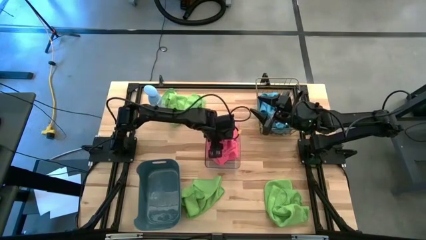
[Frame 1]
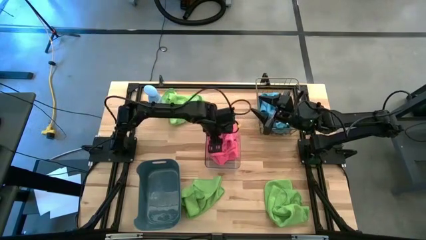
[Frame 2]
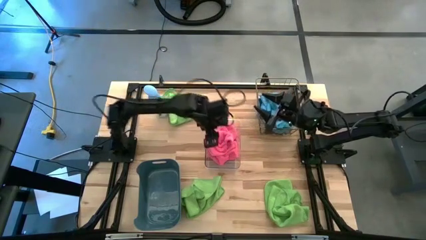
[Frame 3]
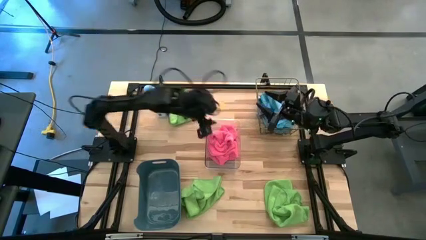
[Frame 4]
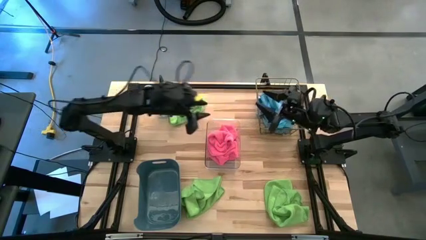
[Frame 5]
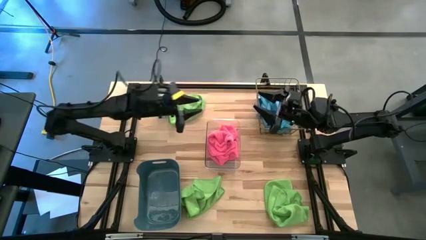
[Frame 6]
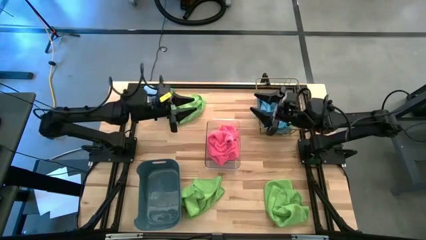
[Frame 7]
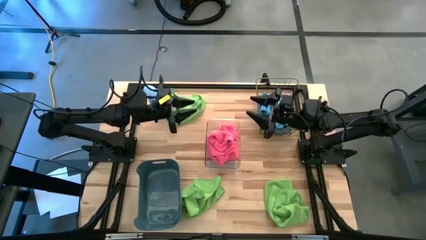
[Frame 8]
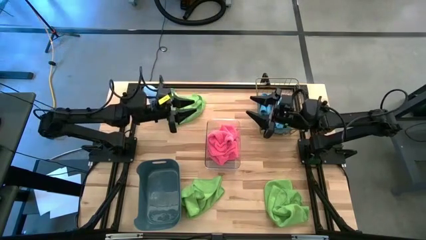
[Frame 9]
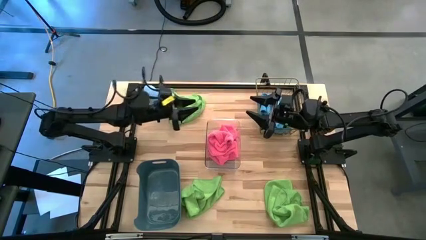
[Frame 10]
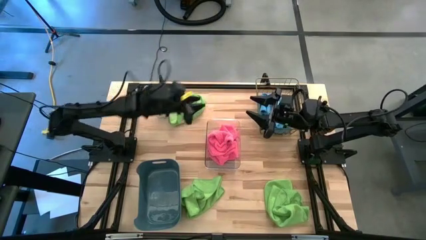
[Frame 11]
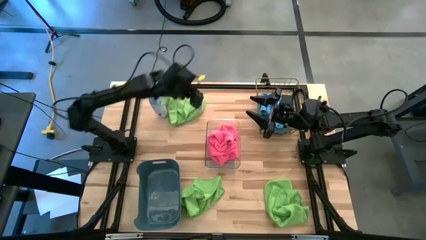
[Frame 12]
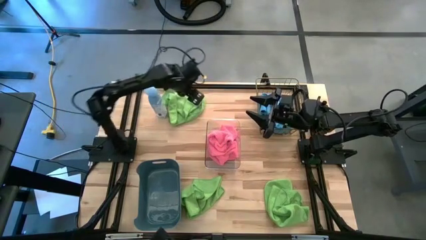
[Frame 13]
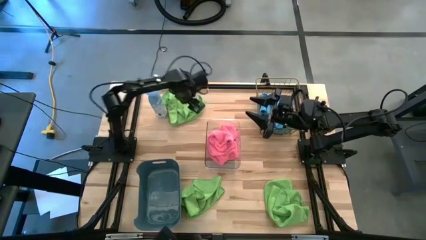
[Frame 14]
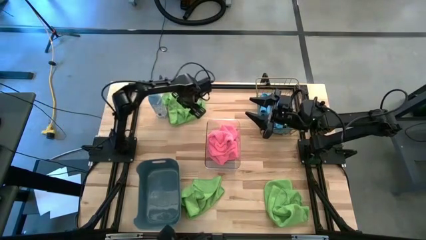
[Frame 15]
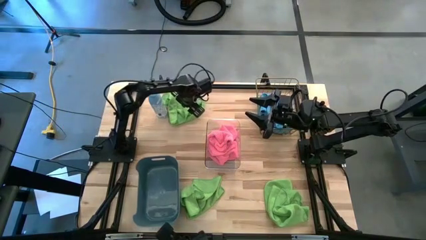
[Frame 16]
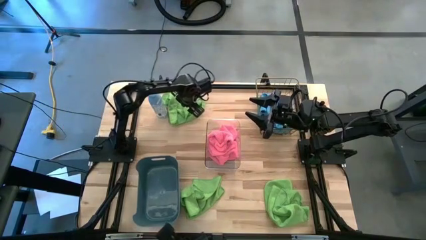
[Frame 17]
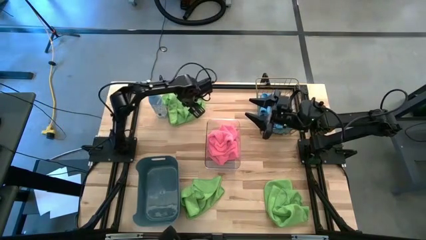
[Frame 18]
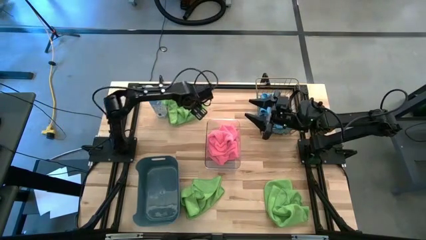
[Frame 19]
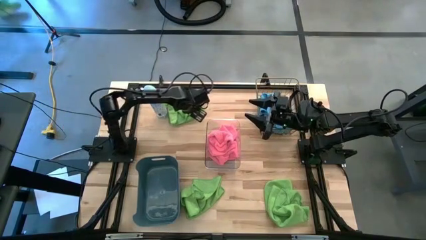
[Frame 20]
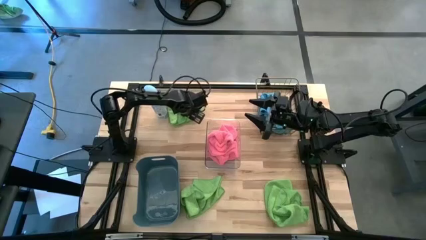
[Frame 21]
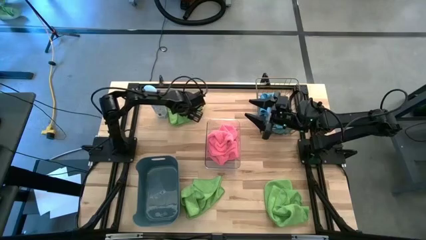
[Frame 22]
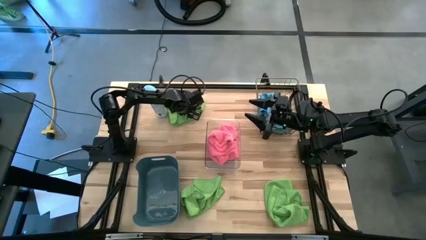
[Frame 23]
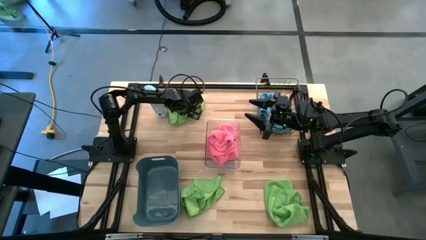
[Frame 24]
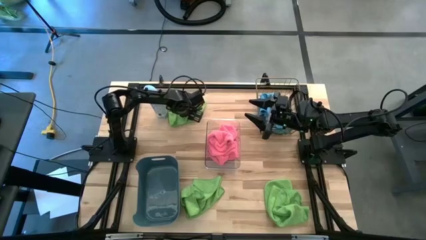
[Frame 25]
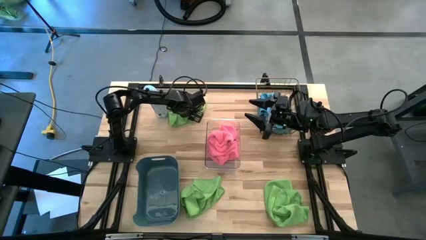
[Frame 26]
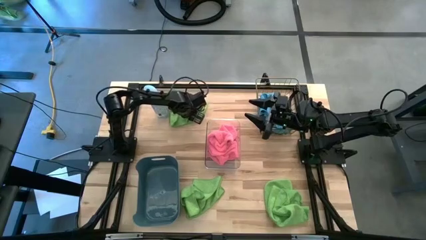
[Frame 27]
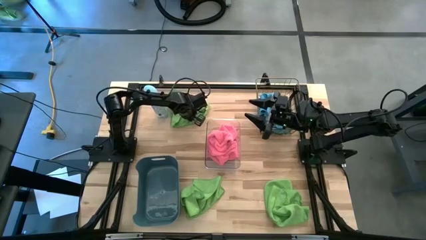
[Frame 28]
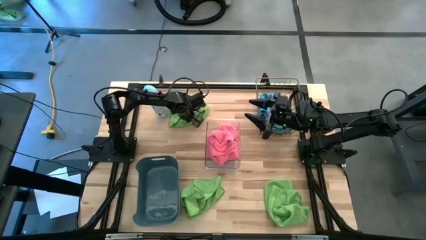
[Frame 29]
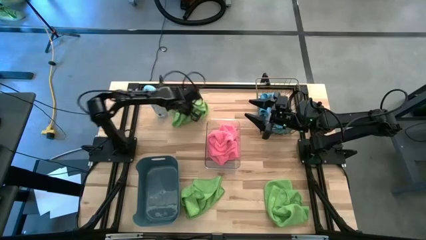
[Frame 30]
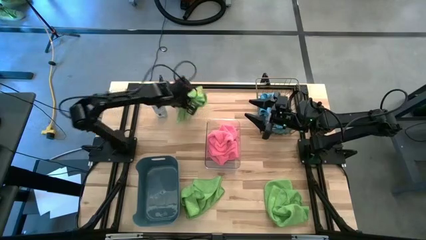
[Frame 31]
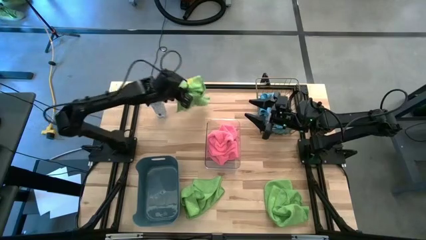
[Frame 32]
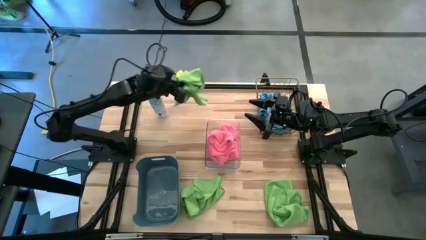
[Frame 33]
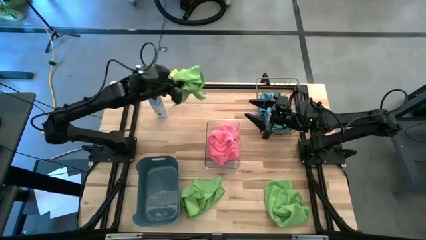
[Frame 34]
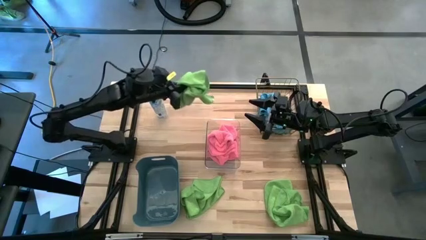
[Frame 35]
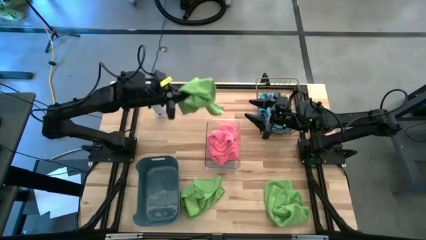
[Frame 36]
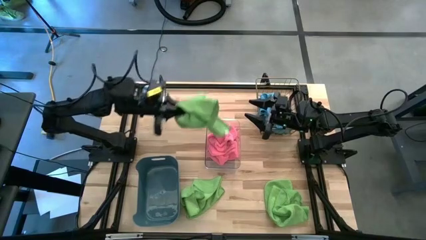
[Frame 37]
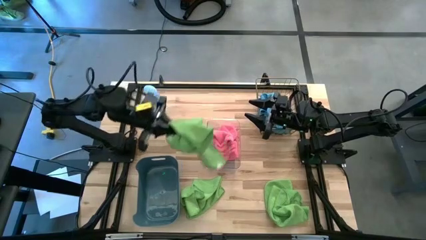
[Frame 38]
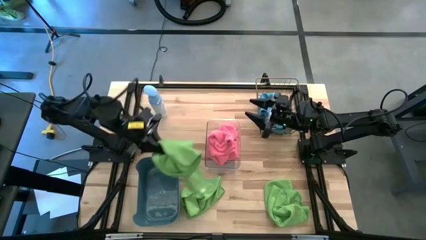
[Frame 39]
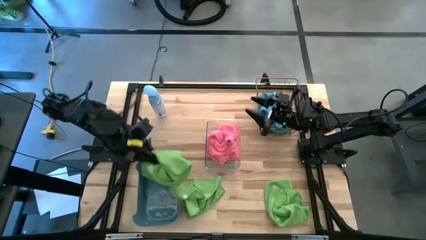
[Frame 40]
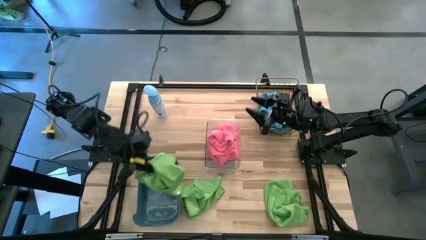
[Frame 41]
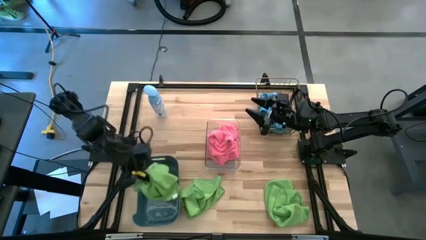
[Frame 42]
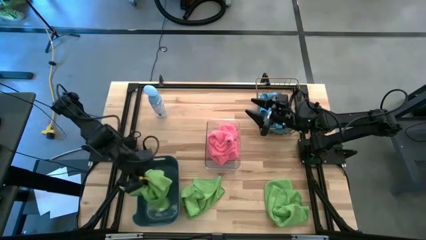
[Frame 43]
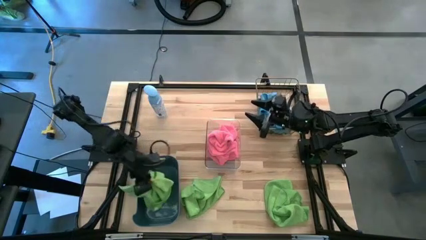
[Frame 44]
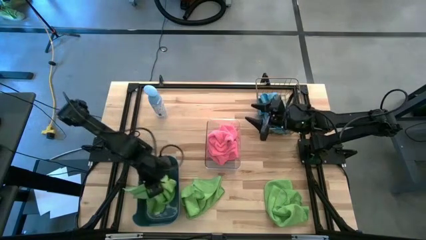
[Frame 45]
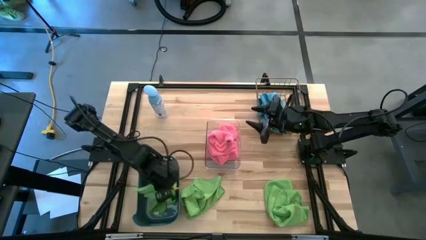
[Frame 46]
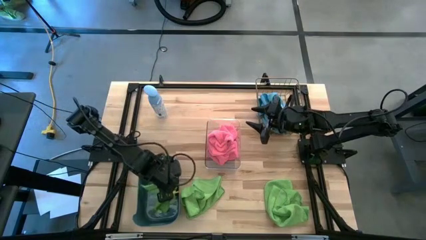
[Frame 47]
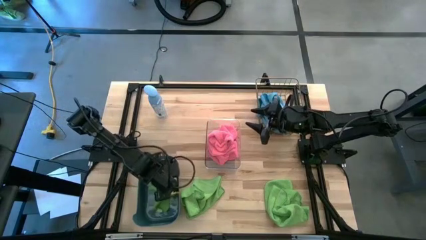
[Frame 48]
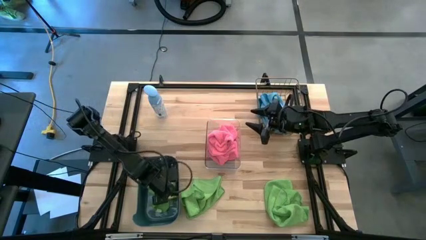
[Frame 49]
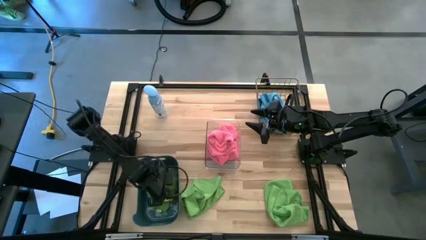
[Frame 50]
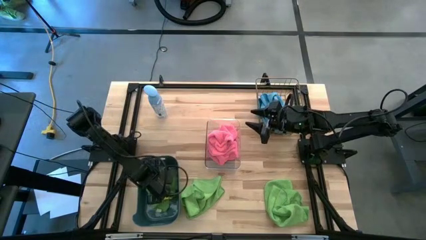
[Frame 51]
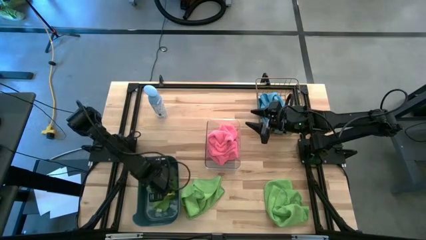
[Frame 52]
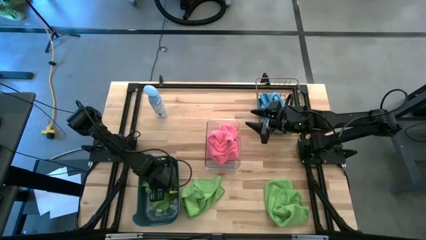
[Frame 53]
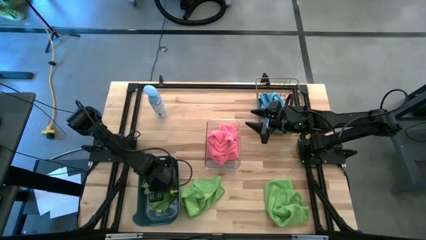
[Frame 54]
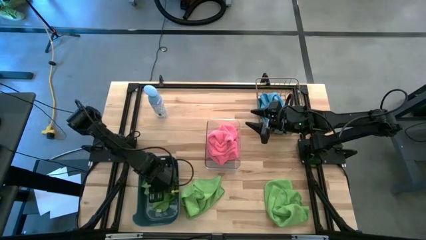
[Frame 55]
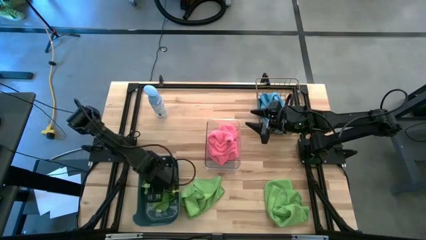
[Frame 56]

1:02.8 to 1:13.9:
Task: Sort microfiber towel by color & place in baskets
Put the top green microfiber cloth into the blue bin
